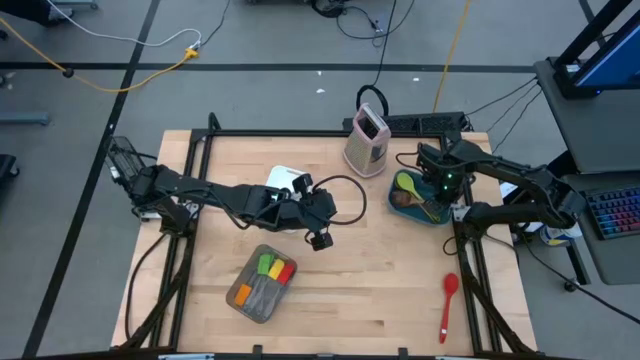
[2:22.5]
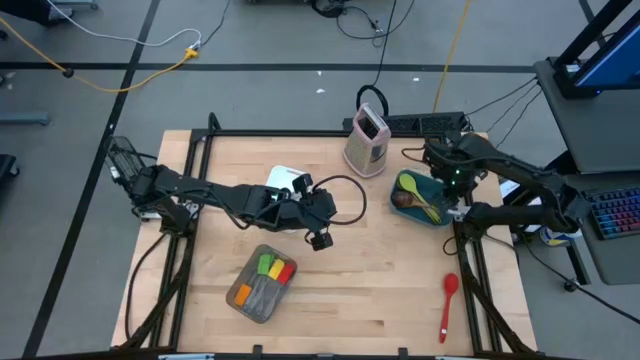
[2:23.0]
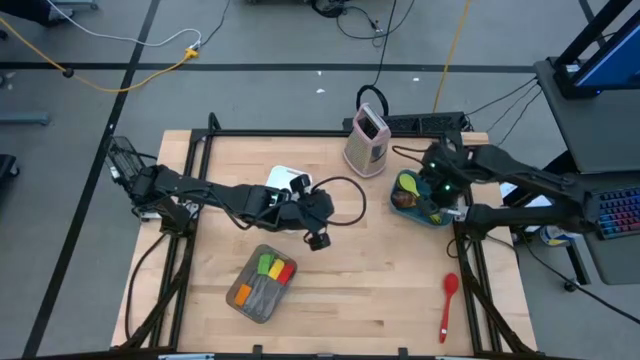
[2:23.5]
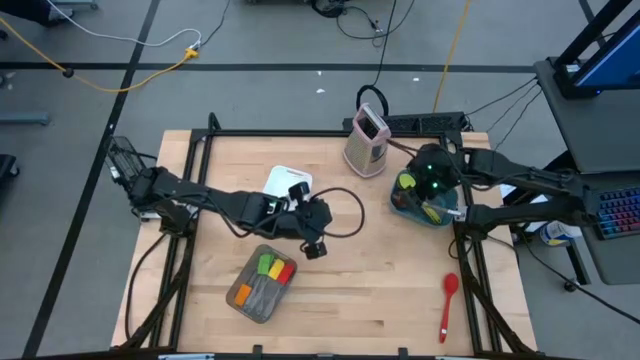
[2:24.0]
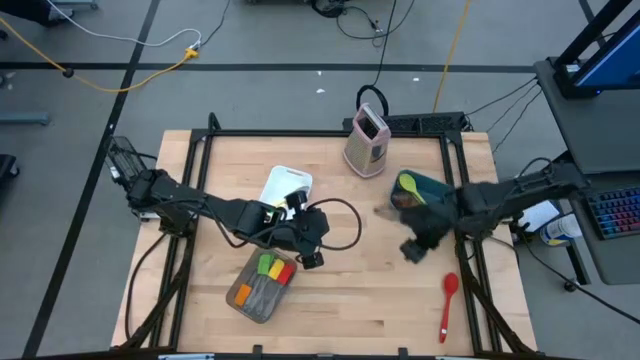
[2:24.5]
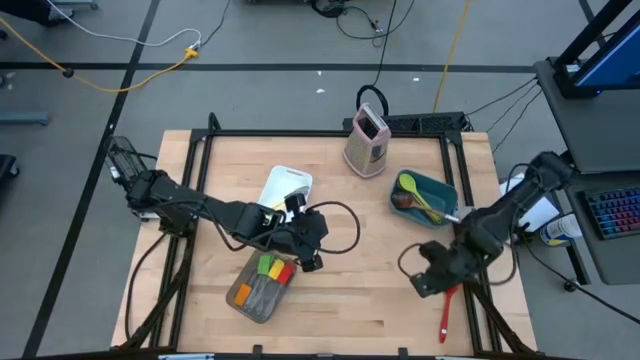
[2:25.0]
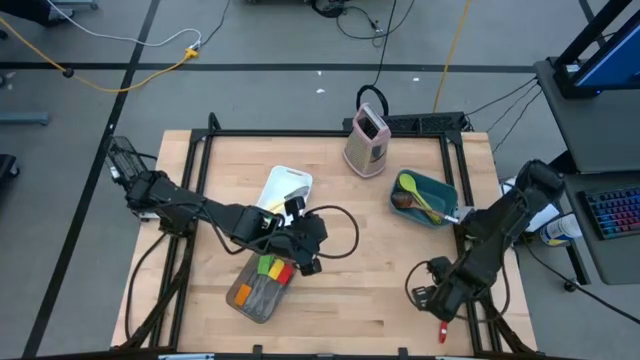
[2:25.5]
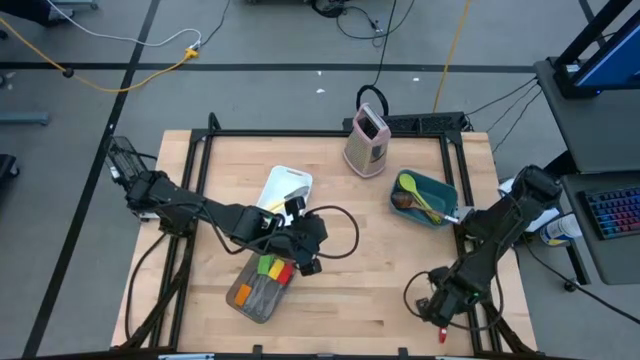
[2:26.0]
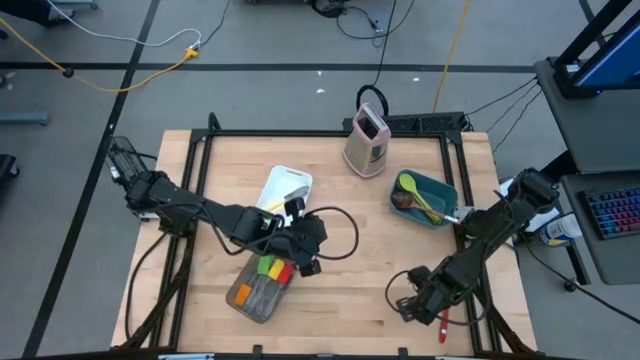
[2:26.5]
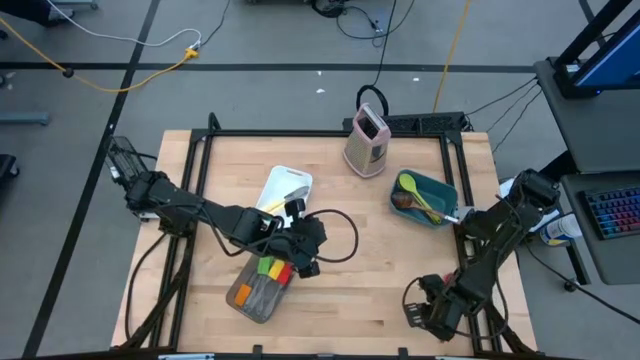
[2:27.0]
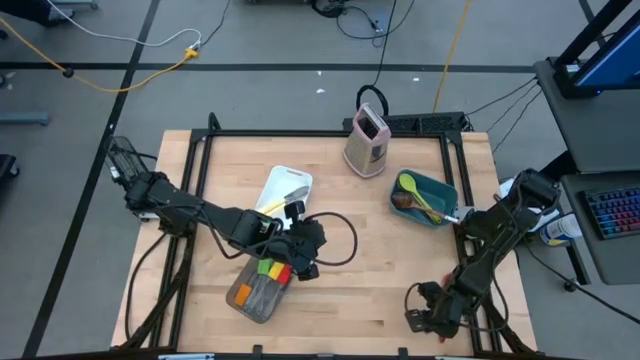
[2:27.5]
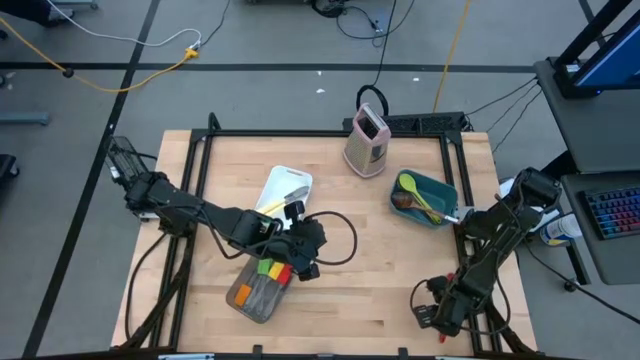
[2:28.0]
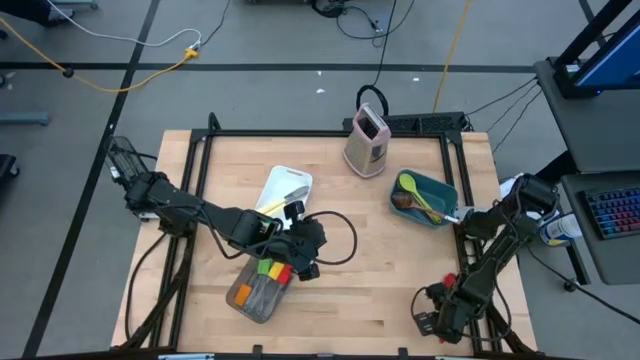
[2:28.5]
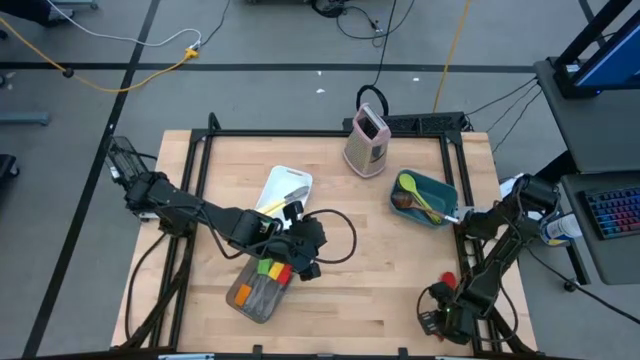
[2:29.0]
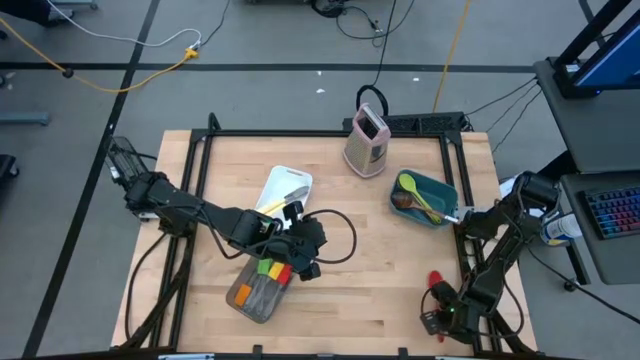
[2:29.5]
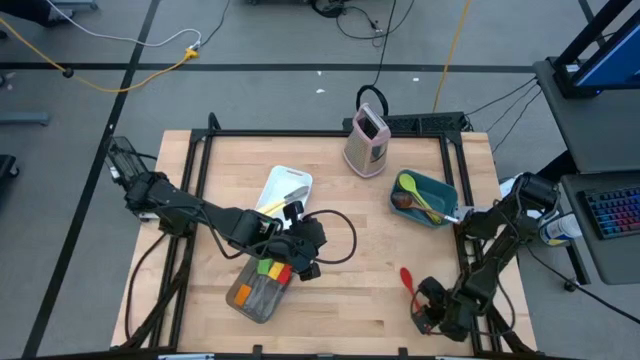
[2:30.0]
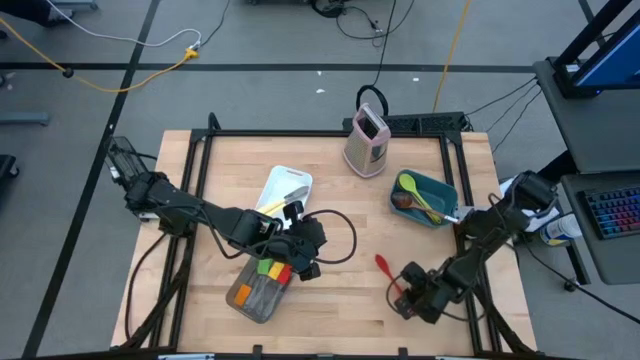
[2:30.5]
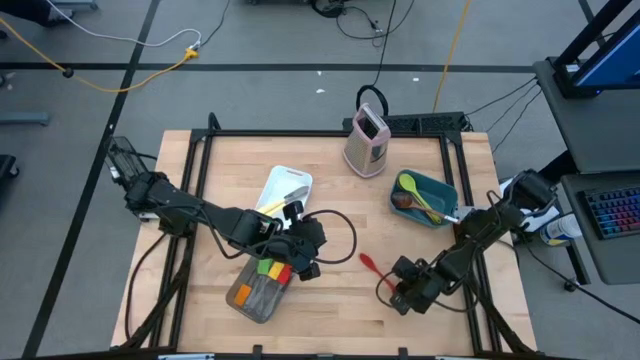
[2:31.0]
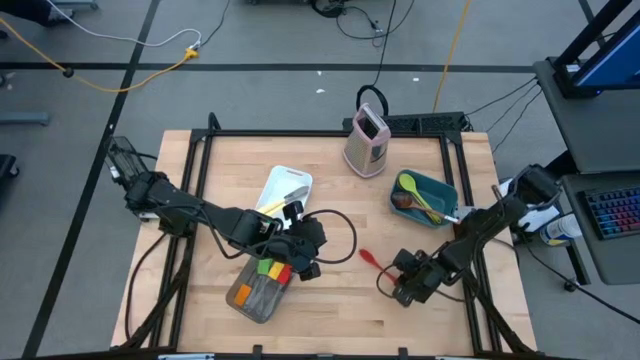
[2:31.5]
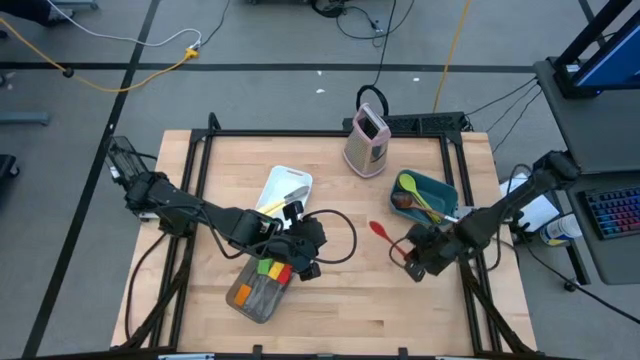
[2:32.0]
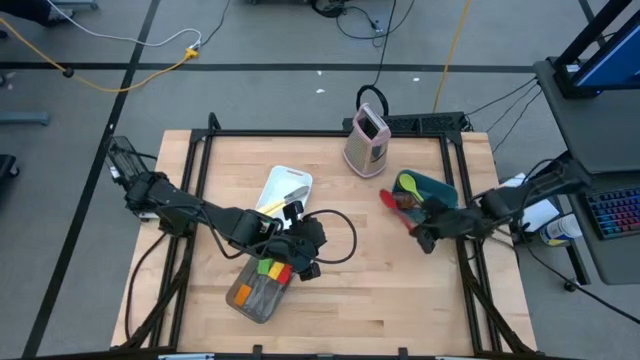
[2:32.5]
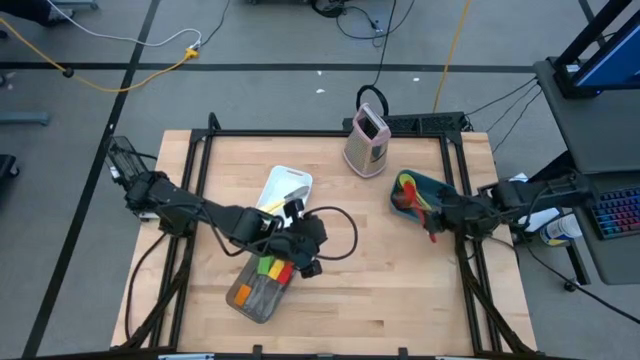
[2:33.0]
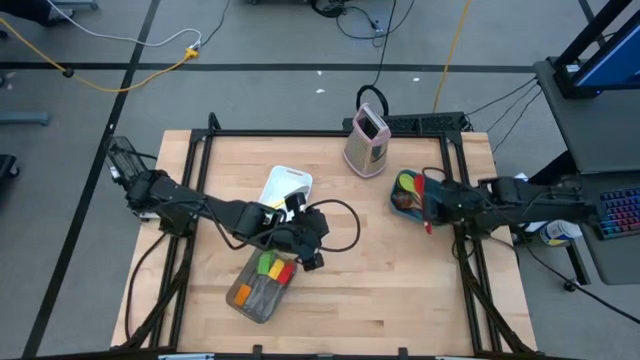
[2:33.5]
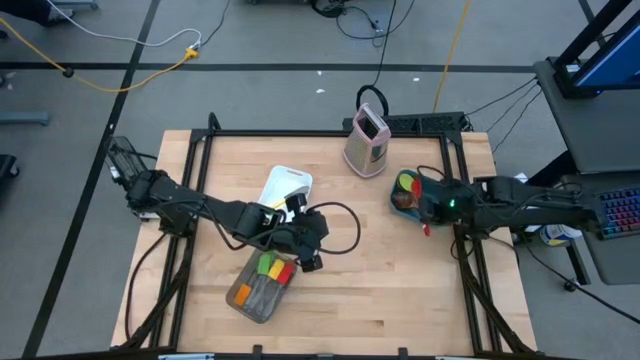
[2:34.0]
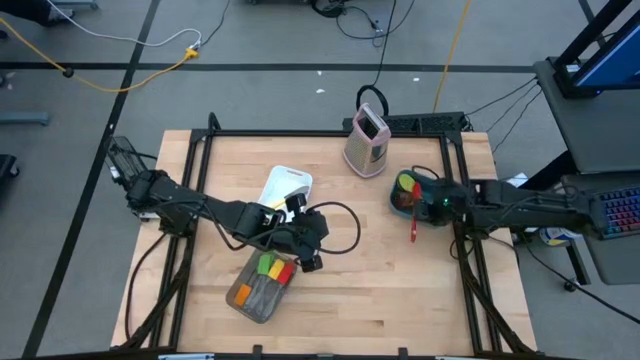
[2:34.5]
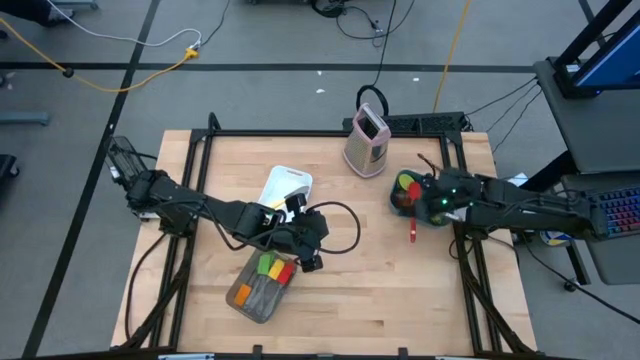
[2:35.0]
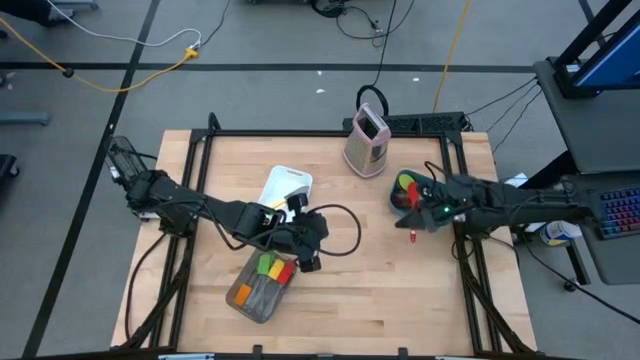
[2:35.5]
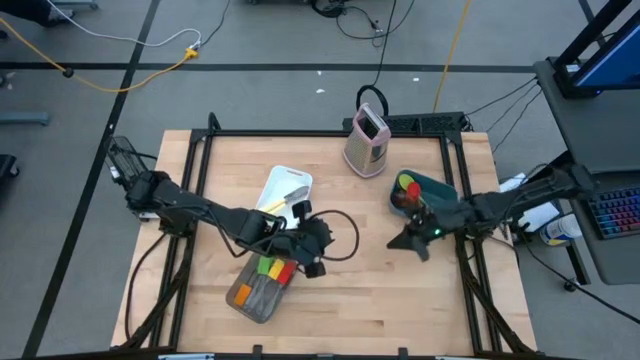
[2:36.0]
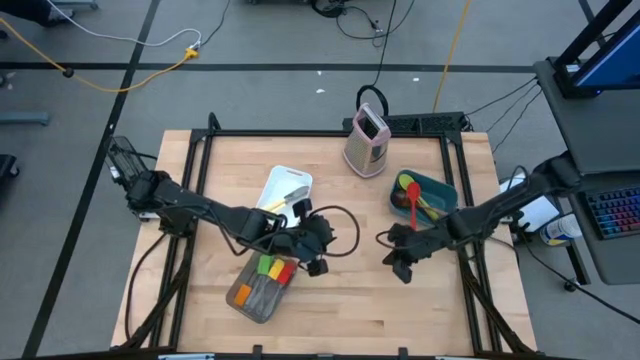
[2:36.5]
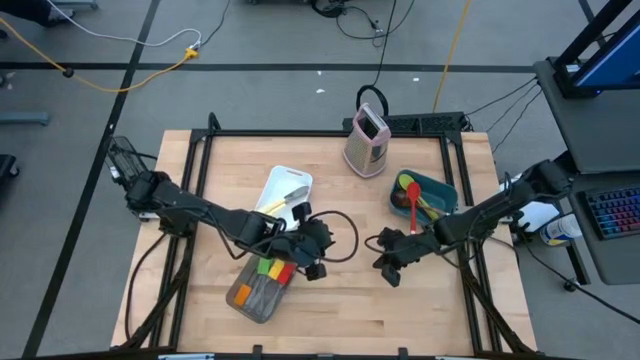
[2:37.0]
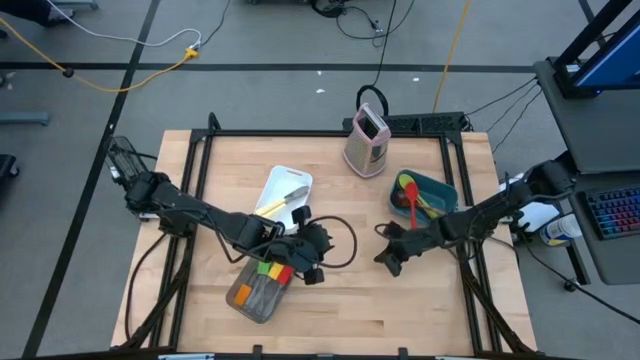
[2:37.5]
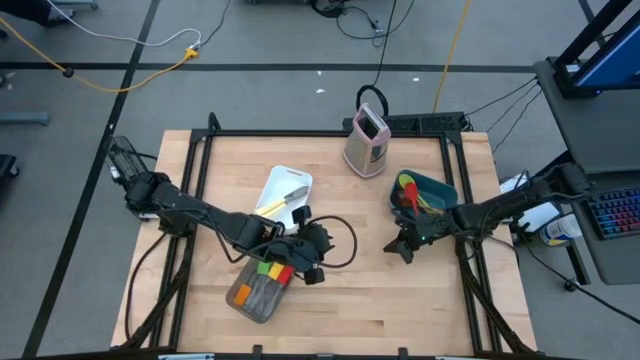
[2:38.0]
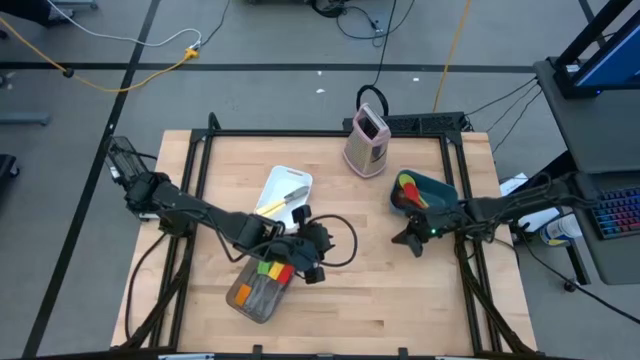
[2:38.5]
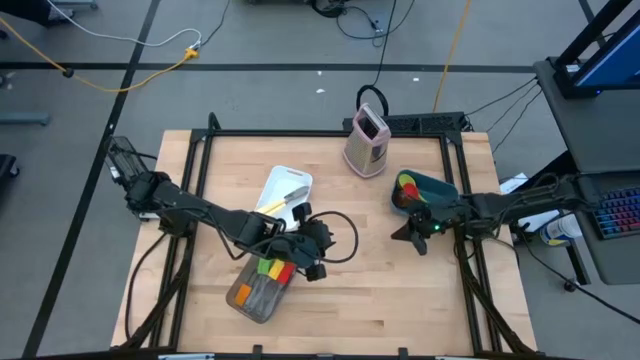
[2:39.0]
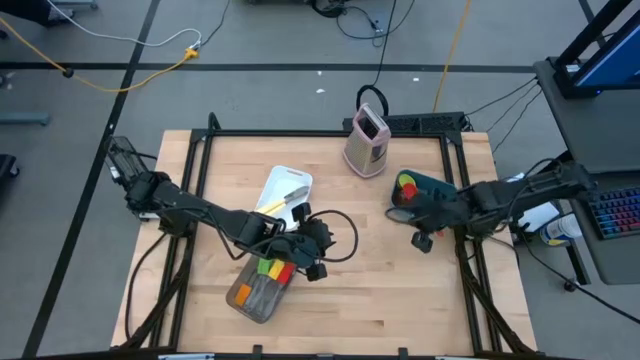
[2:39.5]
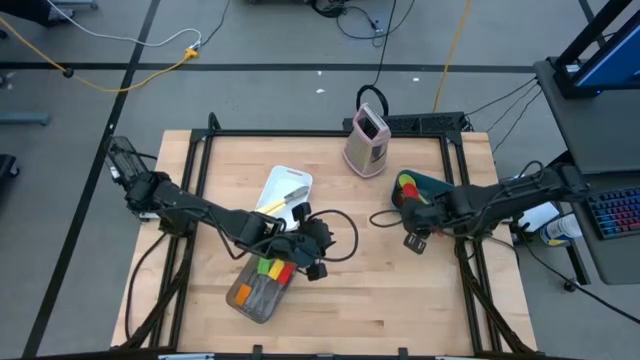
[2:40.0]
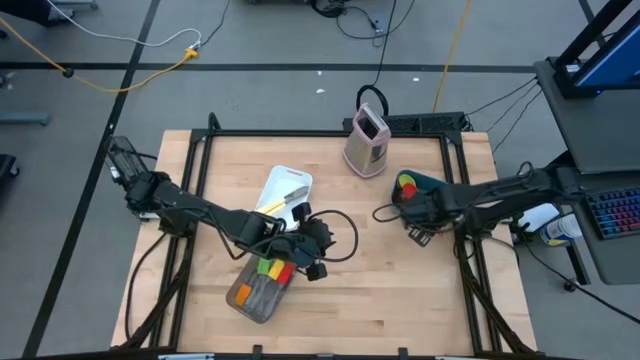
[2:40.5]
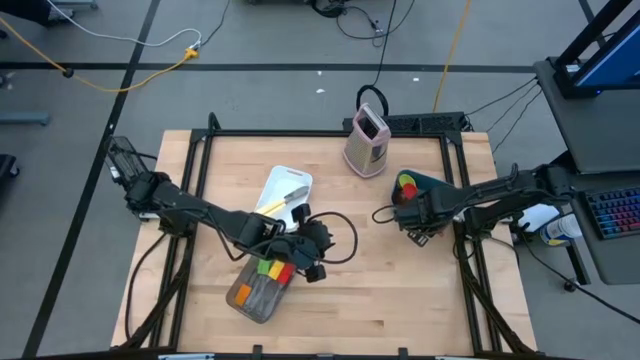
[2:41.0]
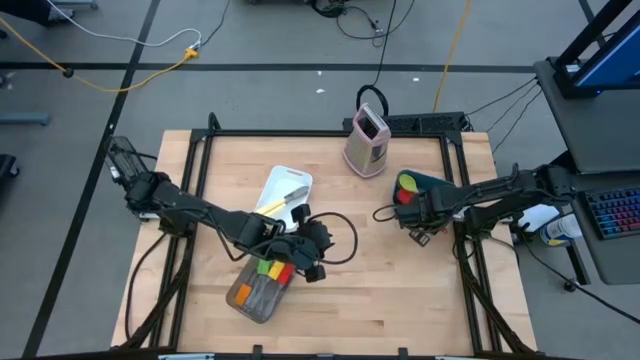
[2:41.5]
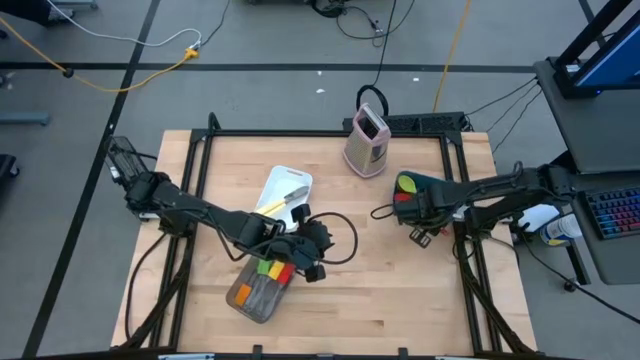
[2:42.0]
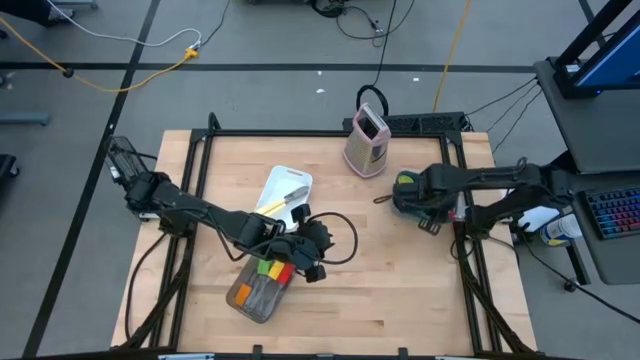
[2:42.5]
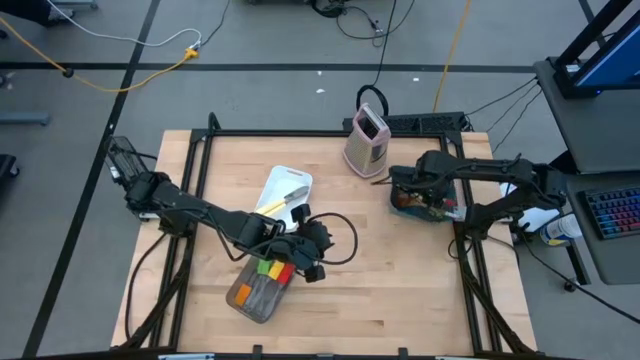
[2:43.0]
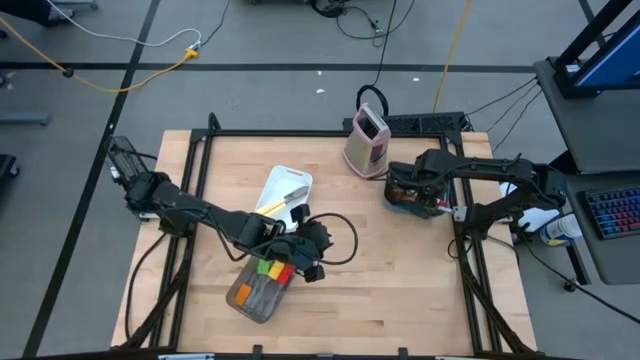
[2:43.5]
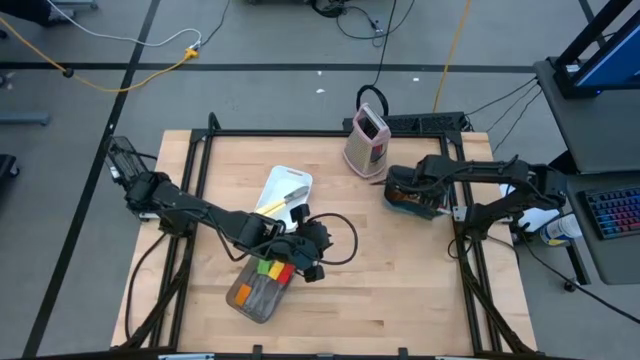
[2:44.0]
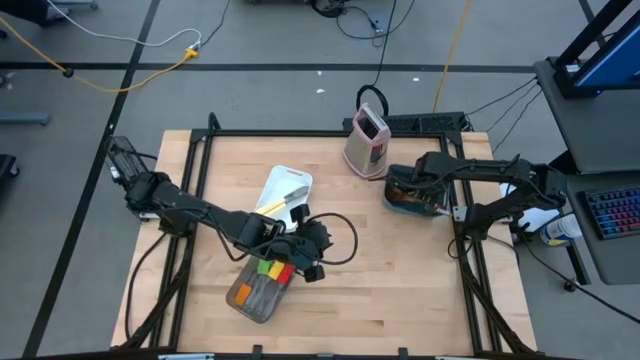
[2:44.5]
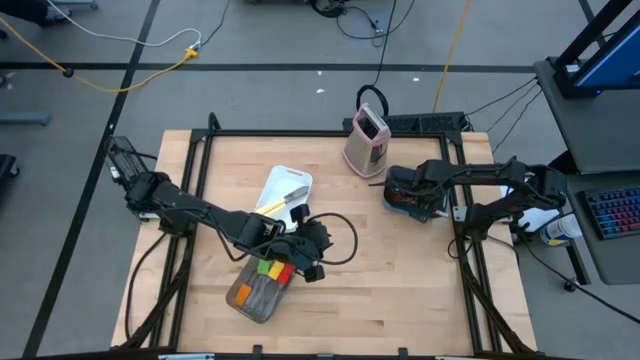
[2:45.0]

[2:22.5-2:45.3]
Task: Pick & Place Kitchen Items
Put the red spoon into the blue bin
